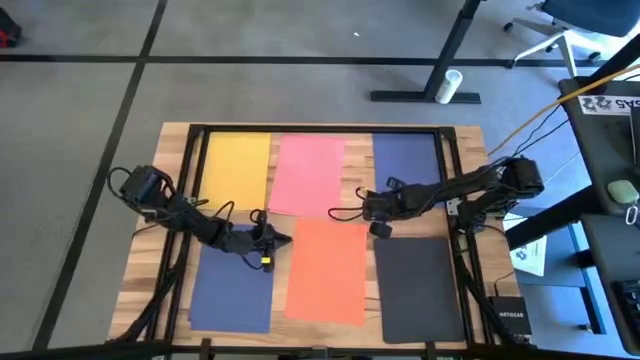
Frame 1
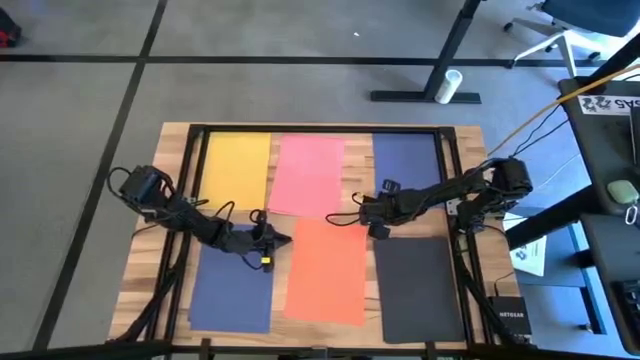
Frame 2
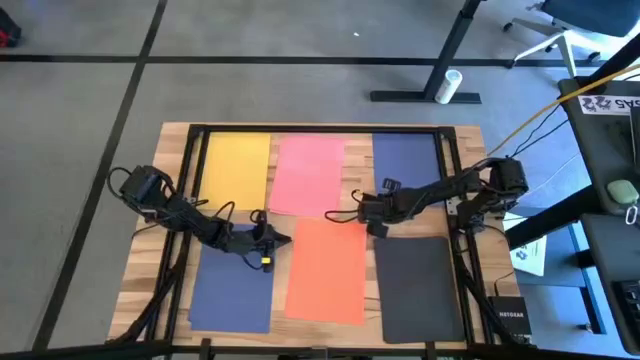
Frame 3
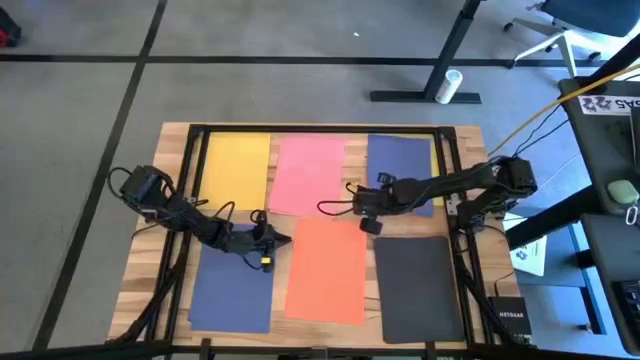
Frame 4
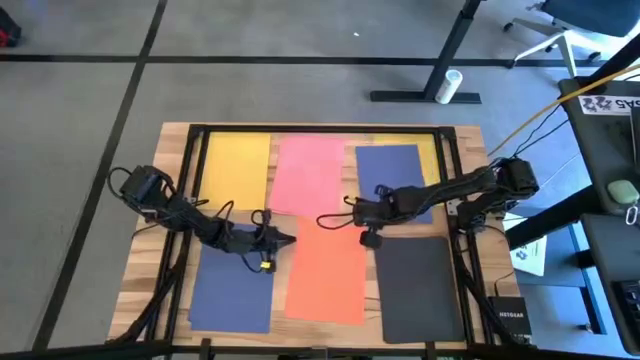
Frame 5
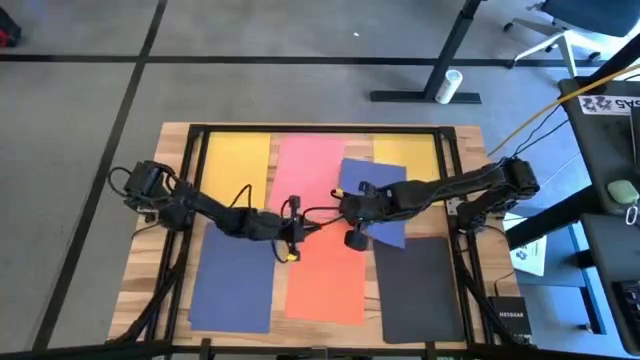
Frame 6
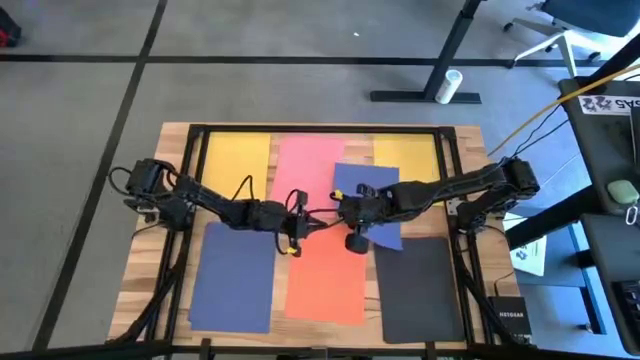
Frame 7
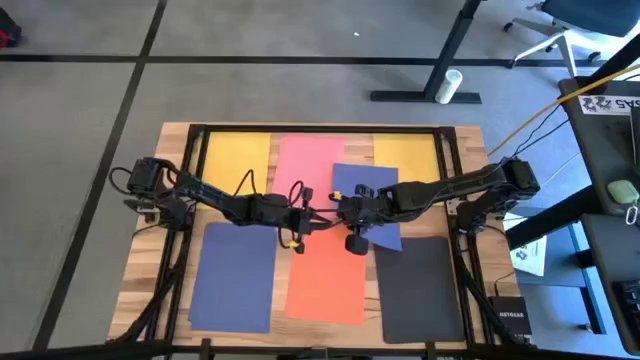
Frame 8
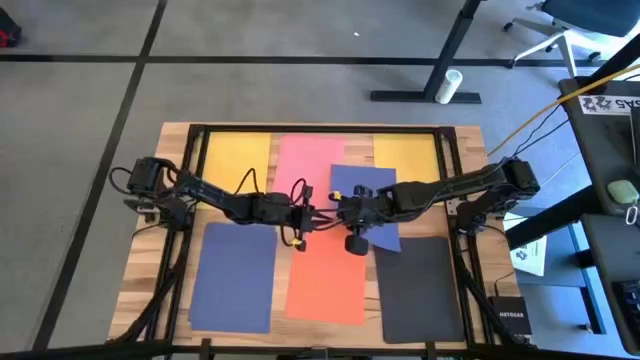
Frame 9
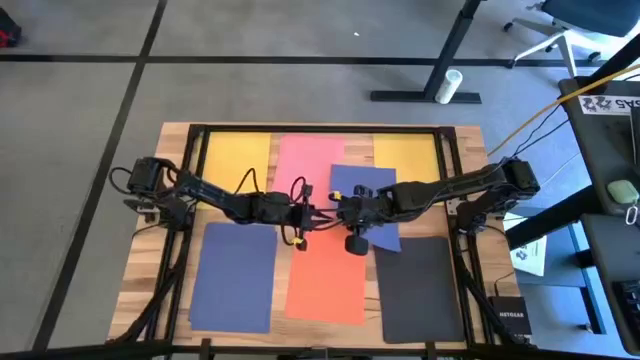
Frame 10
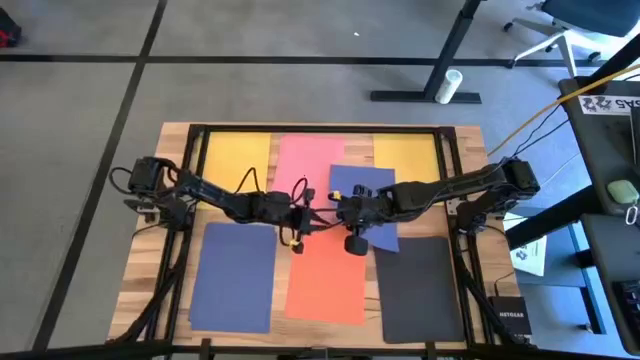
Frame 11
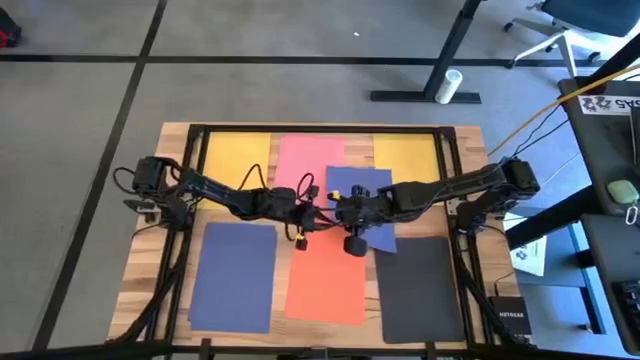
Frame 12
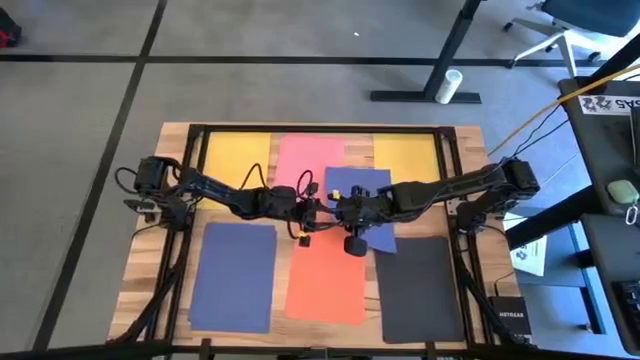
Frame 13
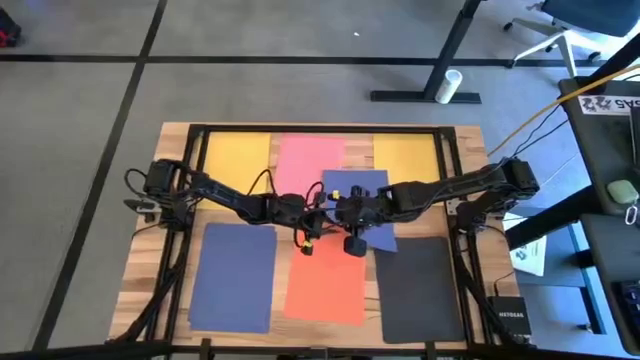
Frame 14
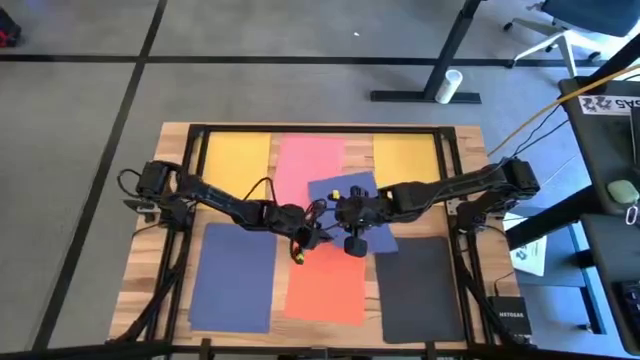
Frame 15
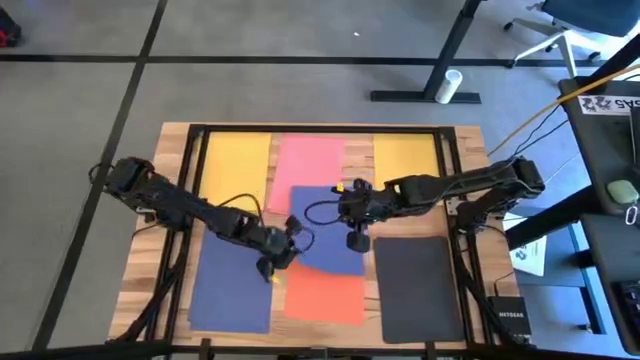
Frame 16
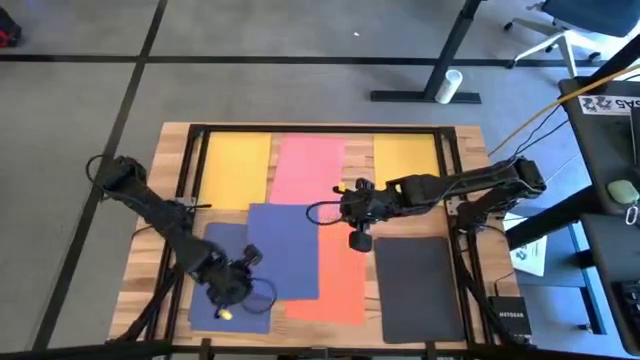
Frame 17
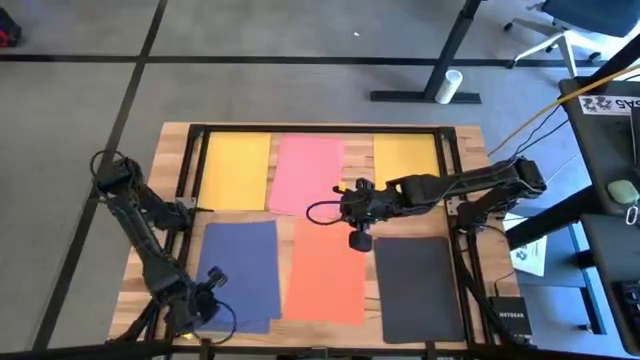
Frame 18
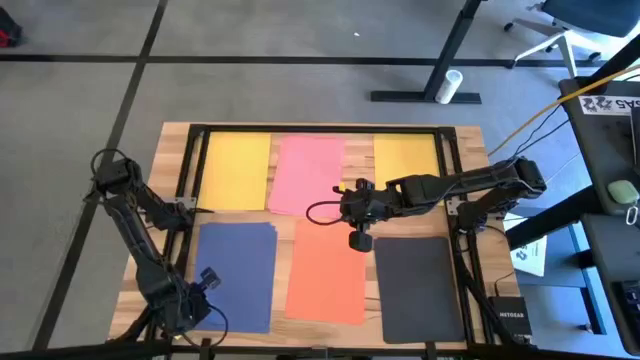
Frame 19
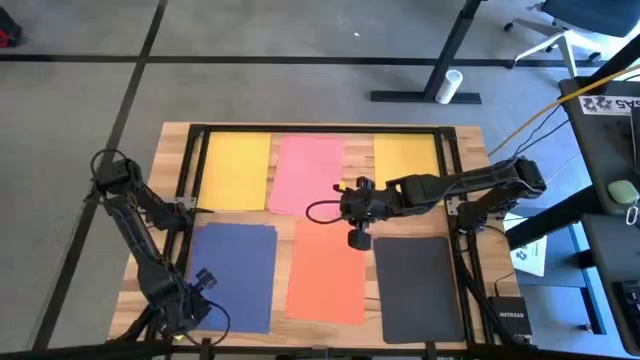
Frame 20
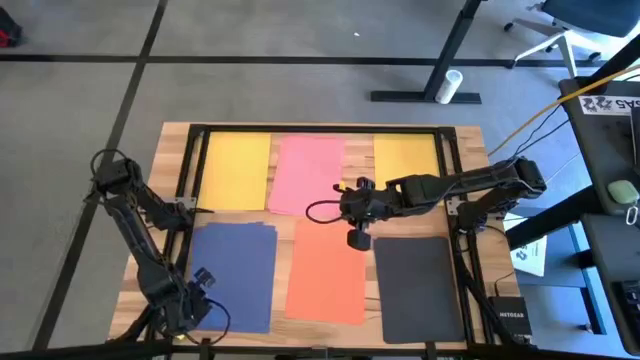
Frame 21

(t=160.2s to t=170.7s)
Task: Organize paper
Stack the violet paper on top of the stacked violet papers

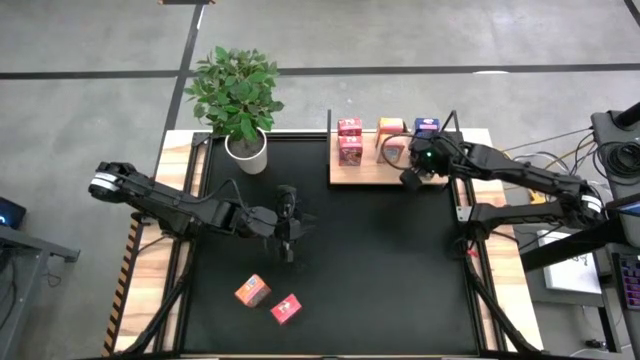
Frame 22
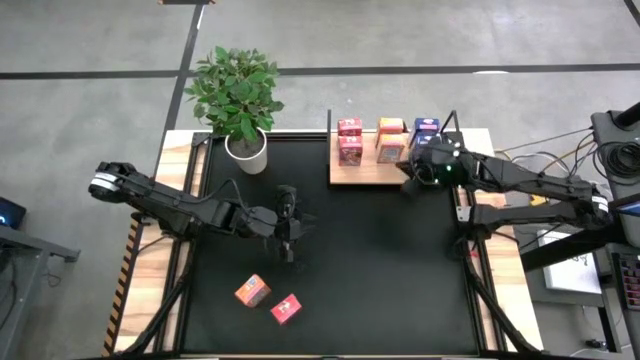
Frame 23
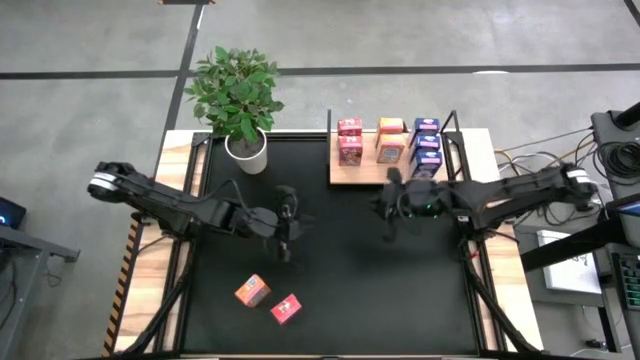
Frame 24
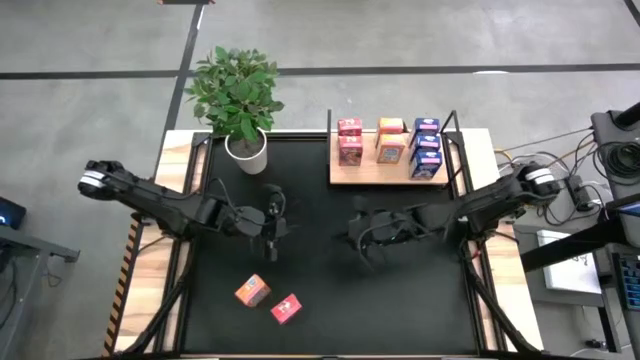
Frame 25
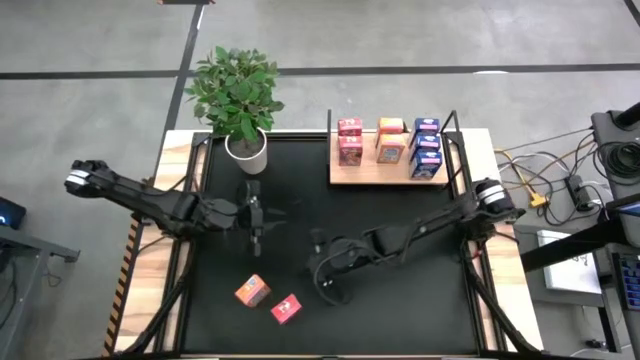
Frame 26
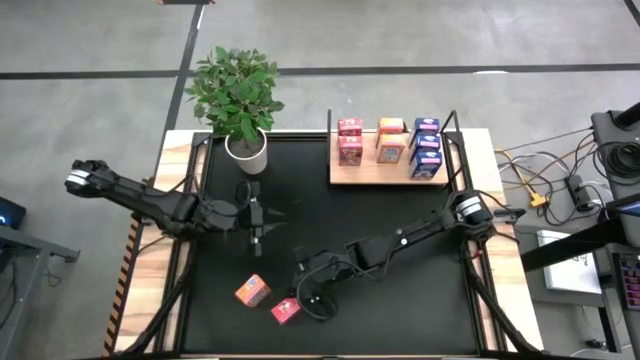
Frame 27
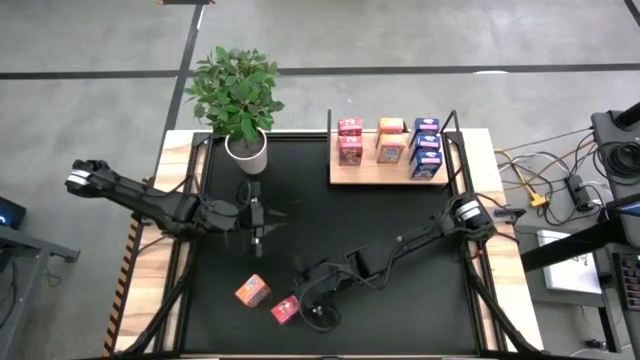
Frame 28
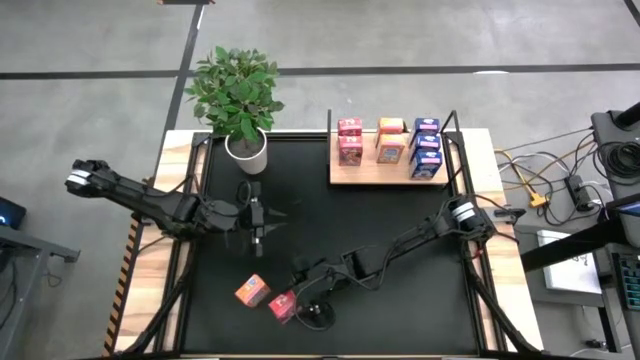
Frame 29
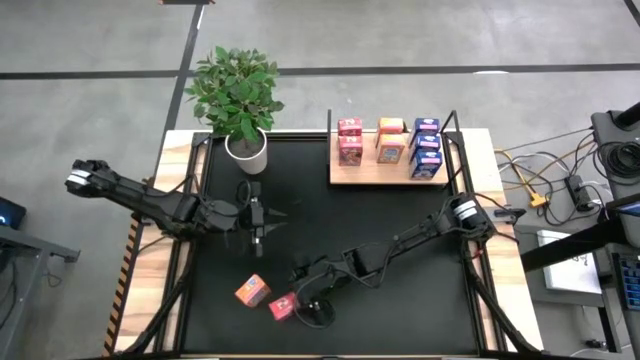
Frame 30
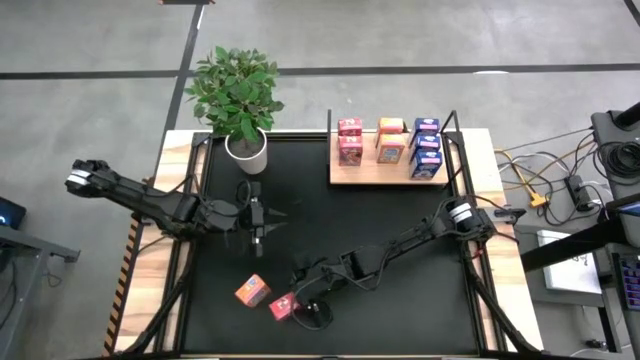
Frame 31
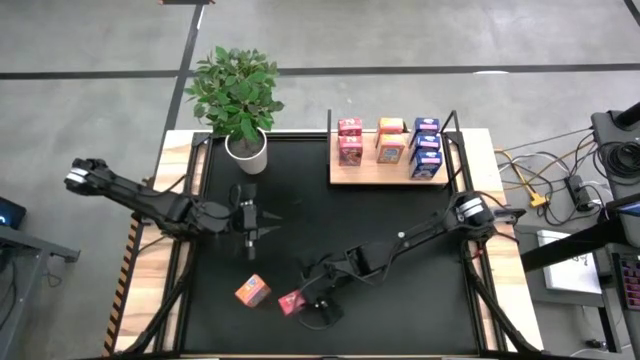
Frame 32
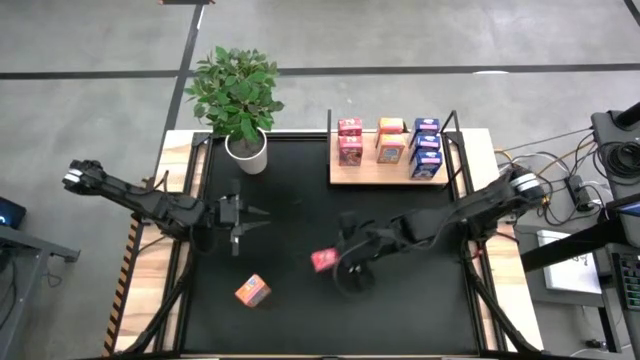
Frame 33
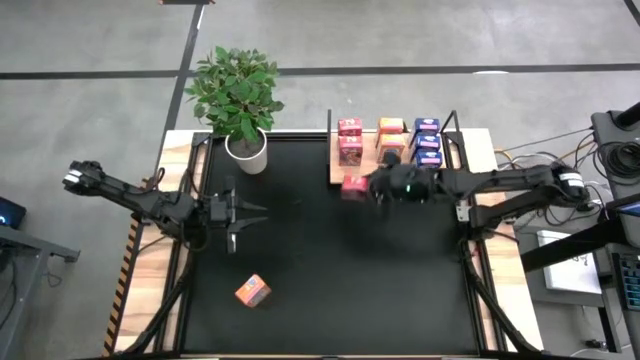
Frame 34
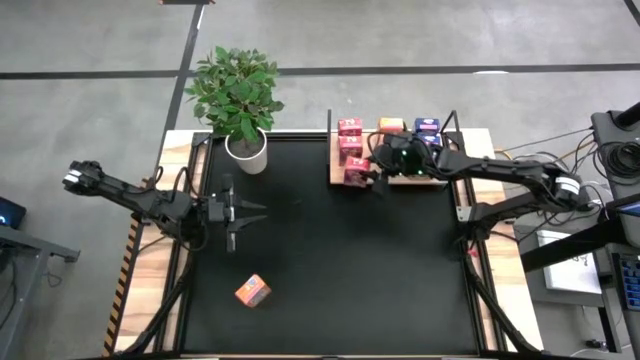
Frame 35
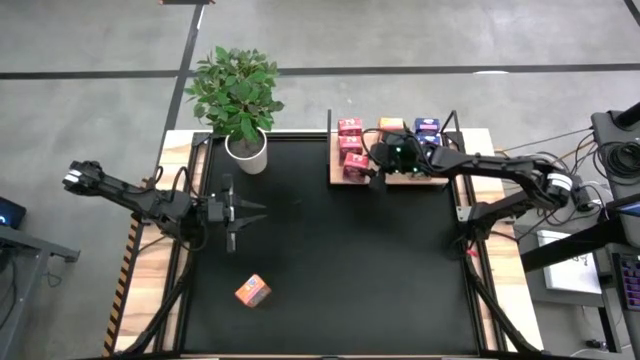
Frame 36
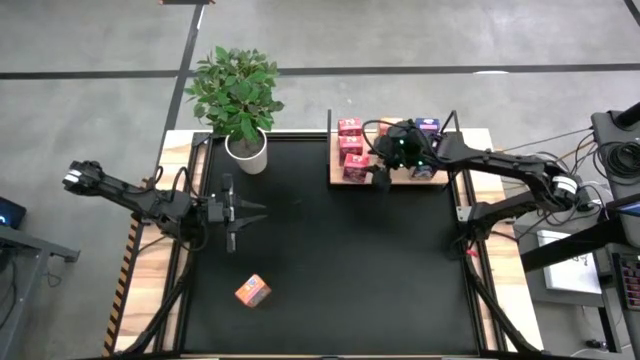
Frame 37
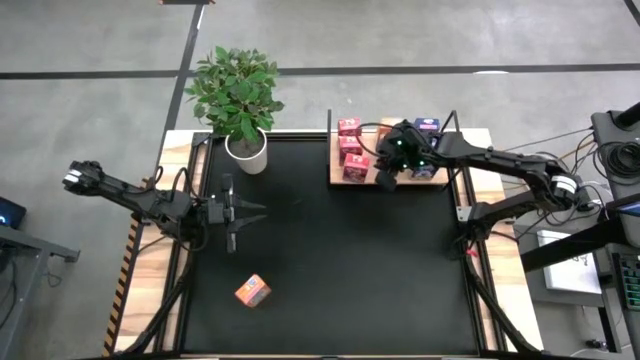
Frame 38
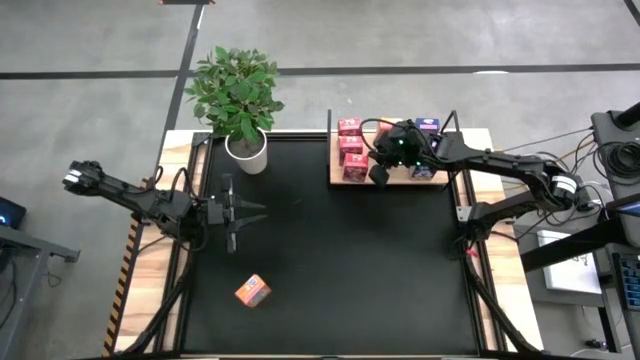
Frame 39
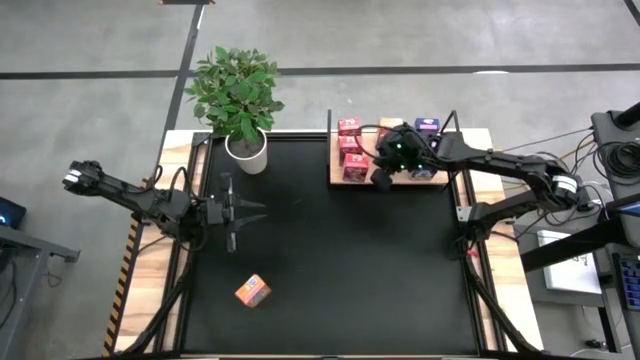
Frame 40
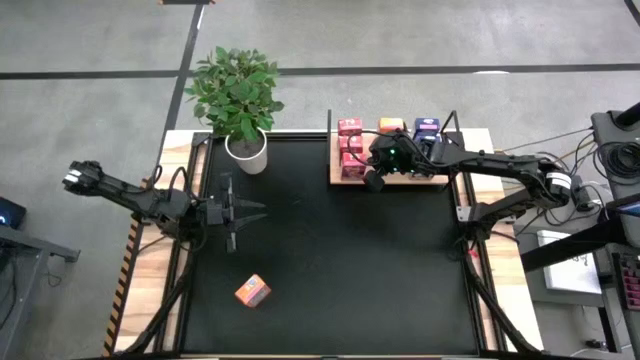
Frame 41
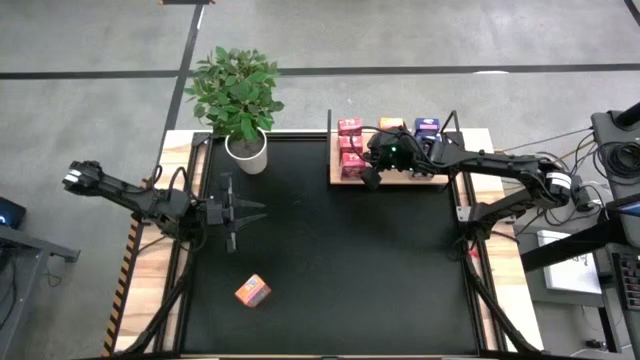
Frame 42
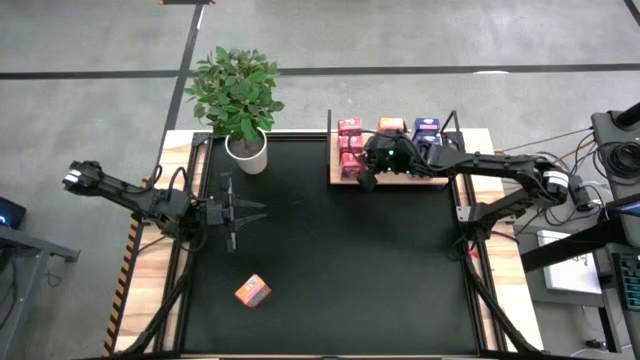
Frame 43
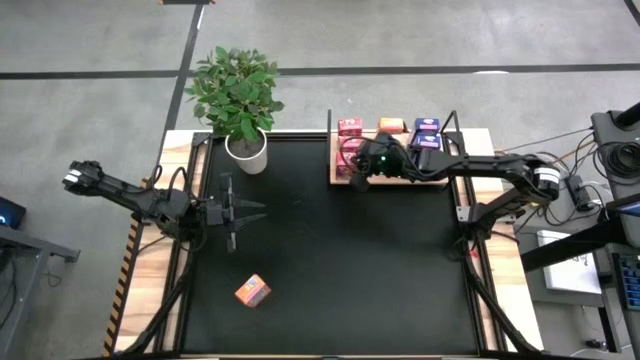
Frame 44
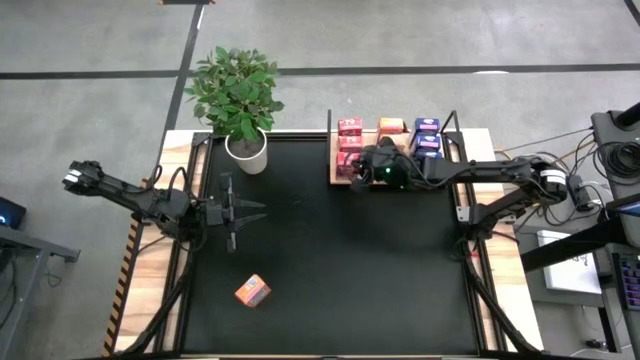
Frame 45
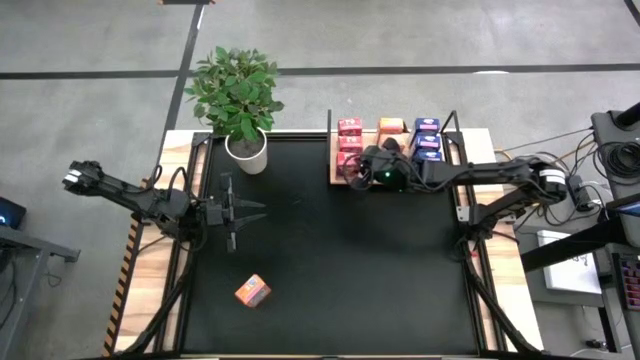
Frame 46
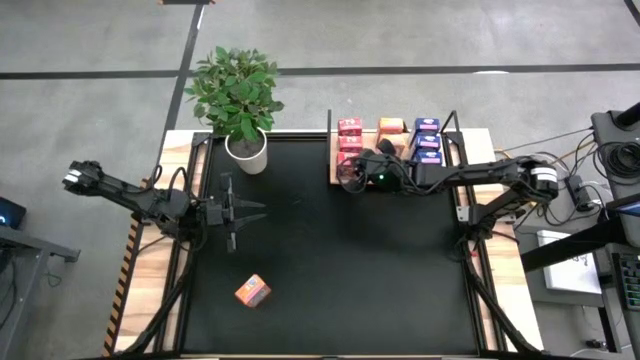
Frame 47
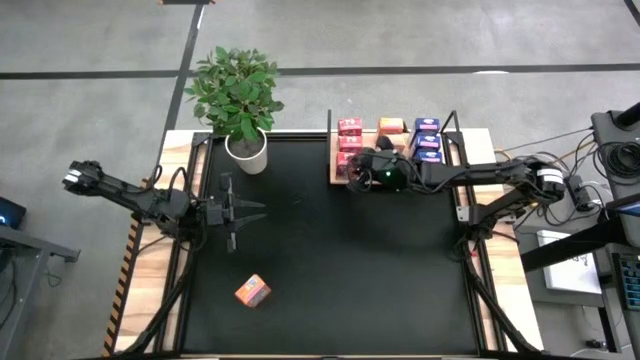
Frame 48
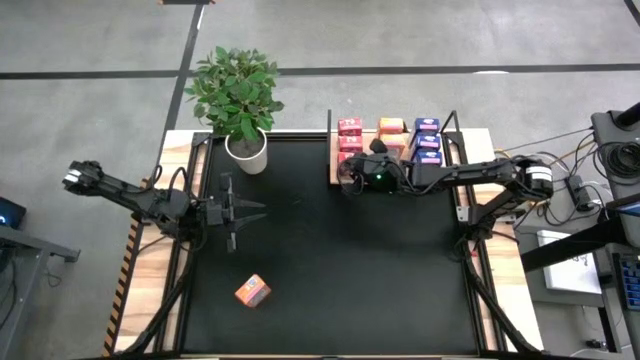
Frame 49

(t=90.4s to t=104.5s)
Task: Stack cereal on shelf
Put the red cereal box on the shelf aligned with the other red cereal box
